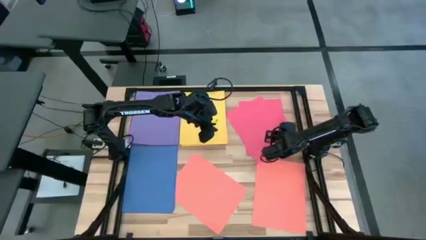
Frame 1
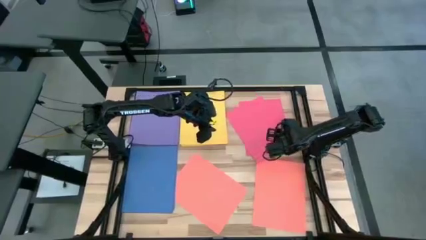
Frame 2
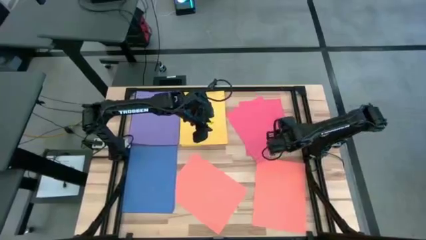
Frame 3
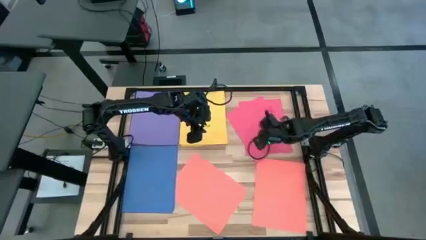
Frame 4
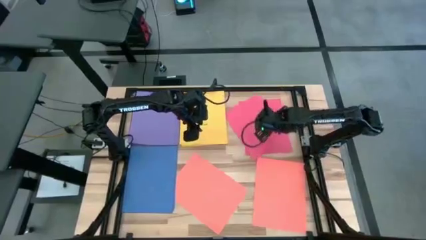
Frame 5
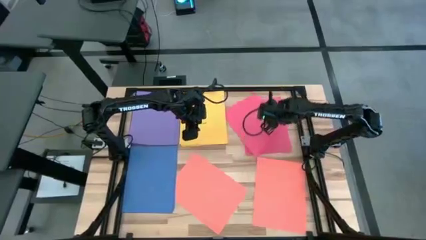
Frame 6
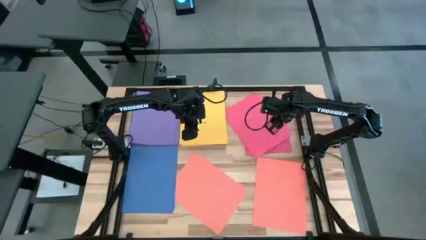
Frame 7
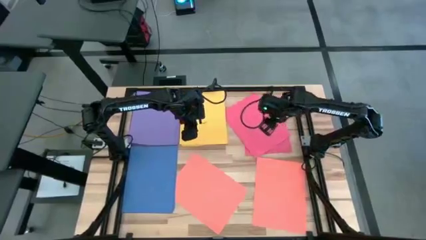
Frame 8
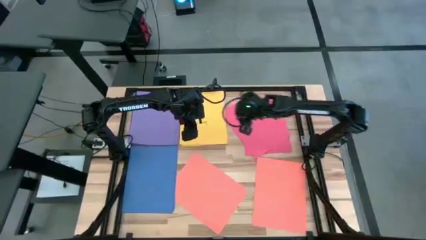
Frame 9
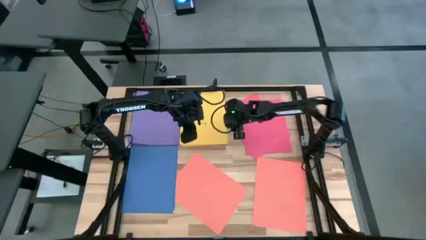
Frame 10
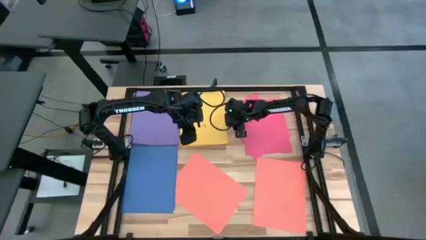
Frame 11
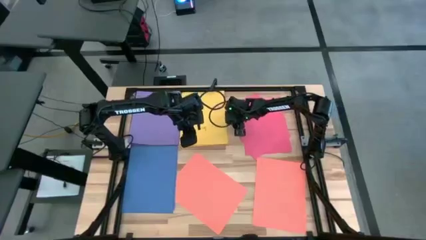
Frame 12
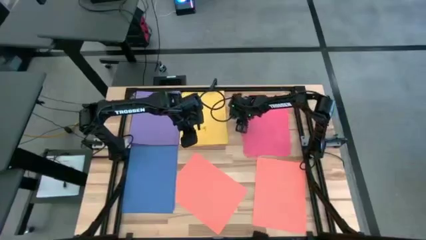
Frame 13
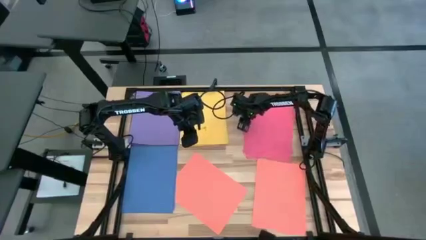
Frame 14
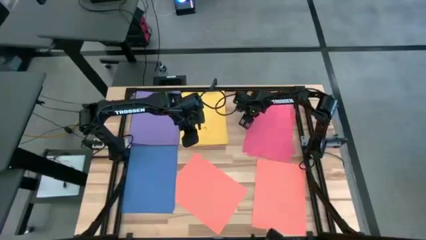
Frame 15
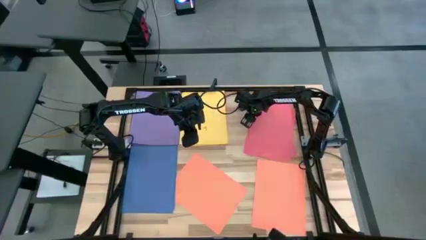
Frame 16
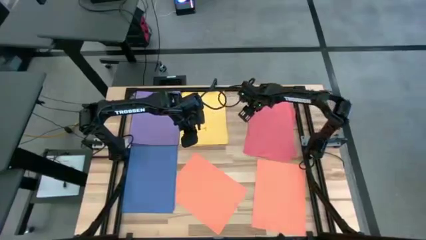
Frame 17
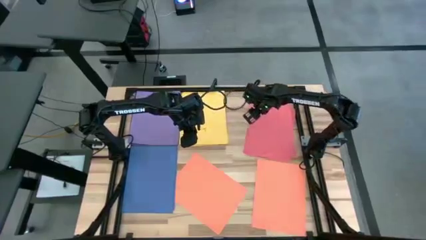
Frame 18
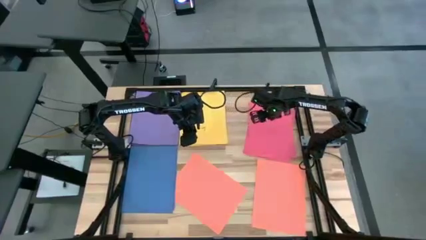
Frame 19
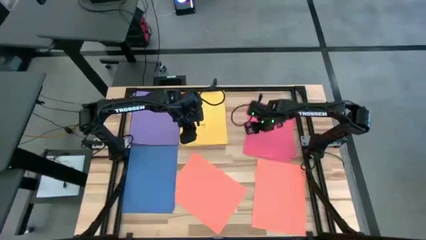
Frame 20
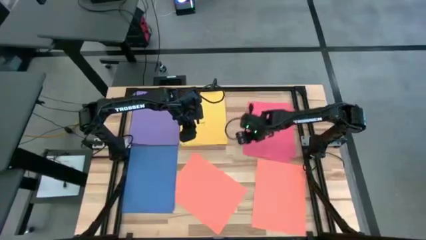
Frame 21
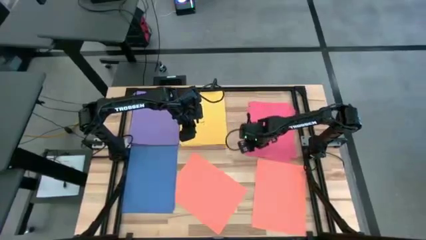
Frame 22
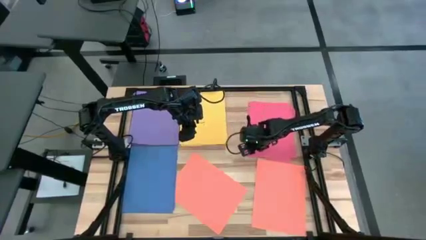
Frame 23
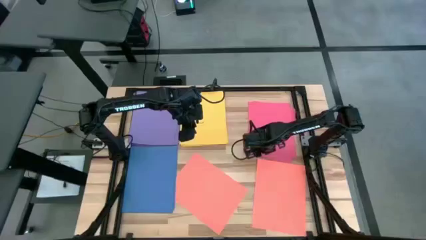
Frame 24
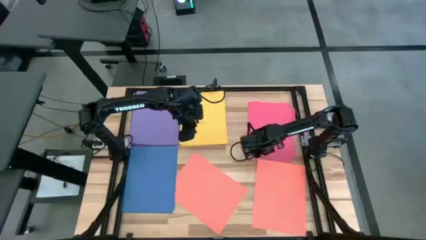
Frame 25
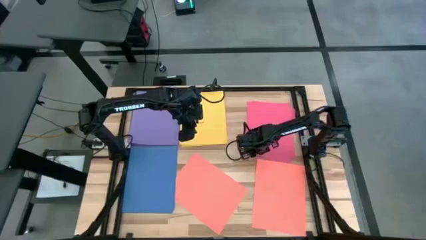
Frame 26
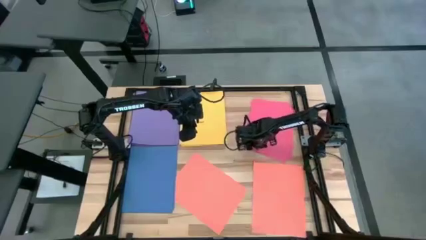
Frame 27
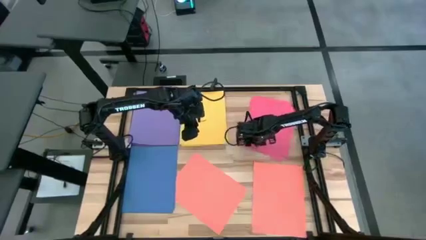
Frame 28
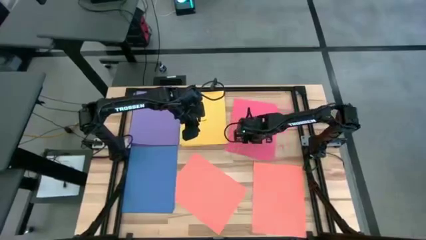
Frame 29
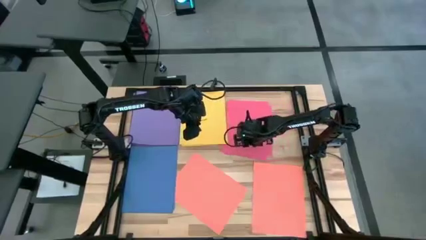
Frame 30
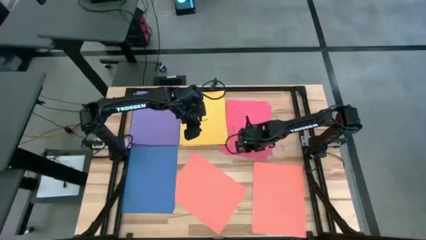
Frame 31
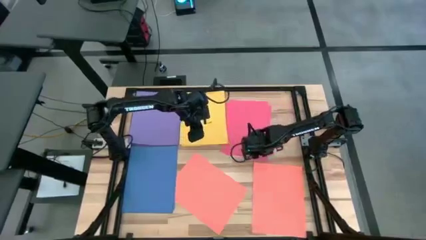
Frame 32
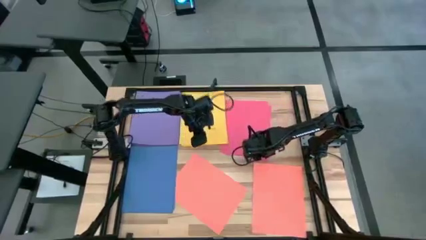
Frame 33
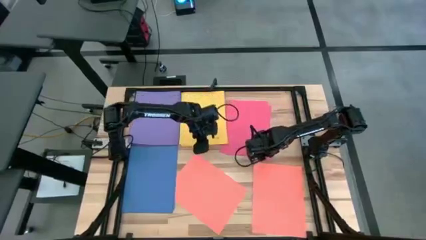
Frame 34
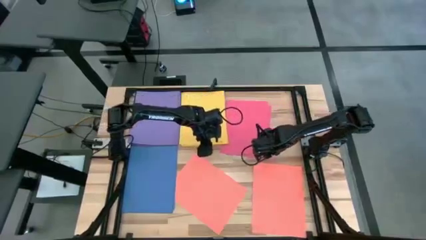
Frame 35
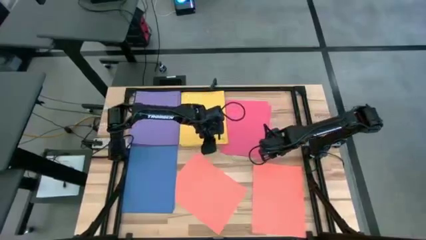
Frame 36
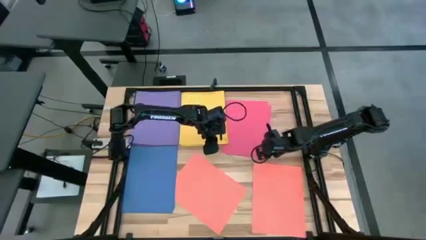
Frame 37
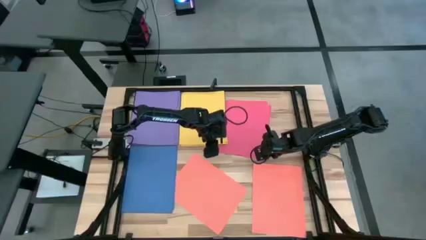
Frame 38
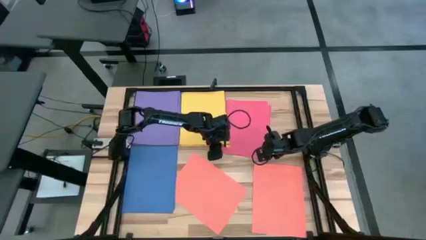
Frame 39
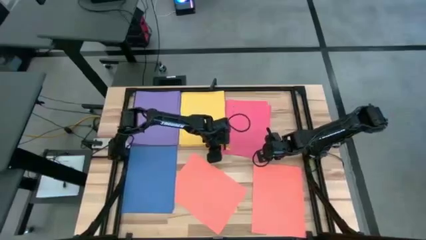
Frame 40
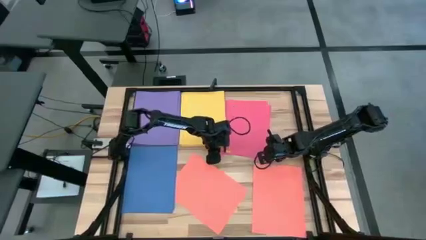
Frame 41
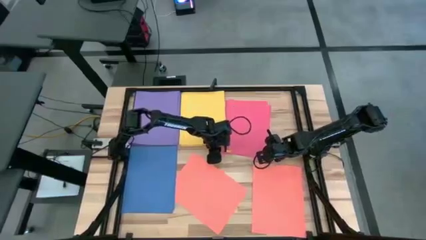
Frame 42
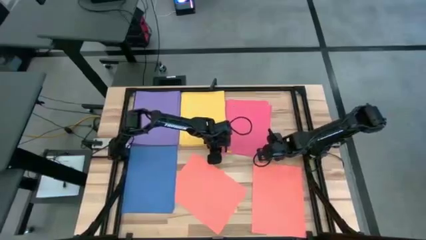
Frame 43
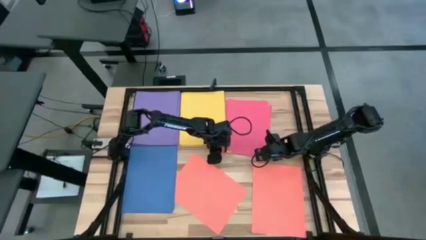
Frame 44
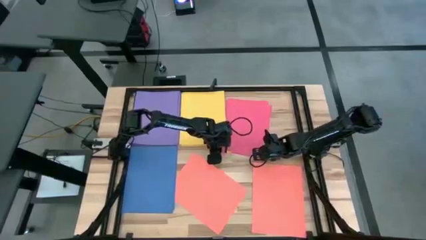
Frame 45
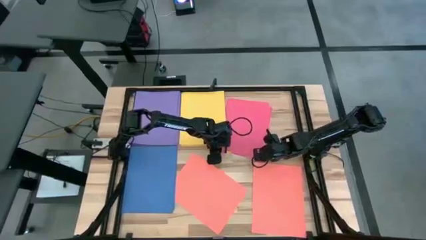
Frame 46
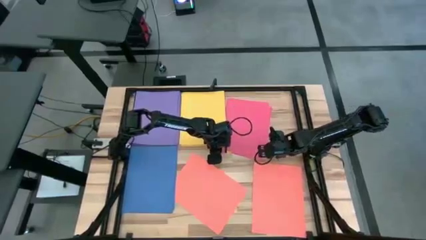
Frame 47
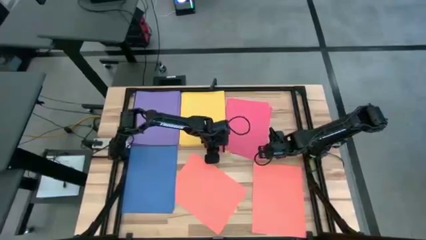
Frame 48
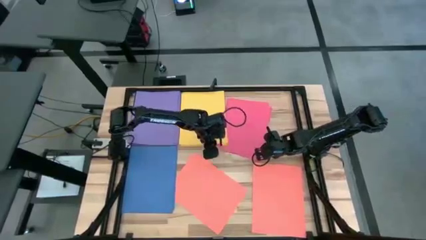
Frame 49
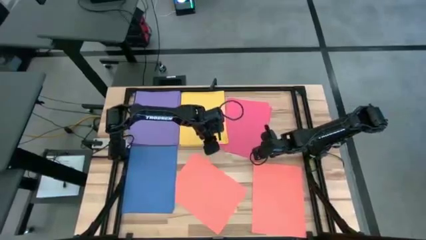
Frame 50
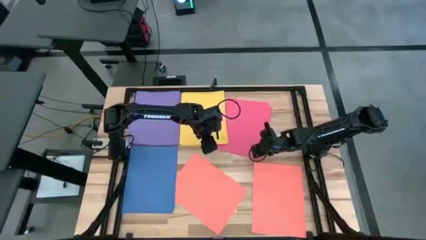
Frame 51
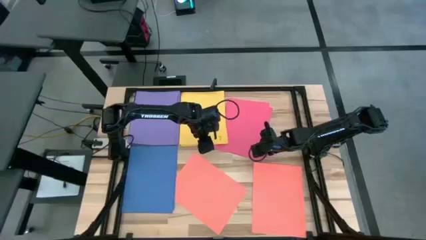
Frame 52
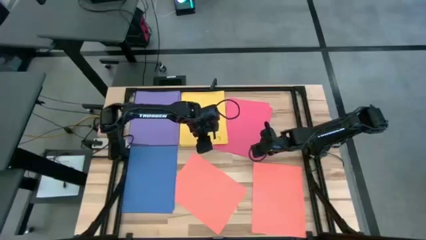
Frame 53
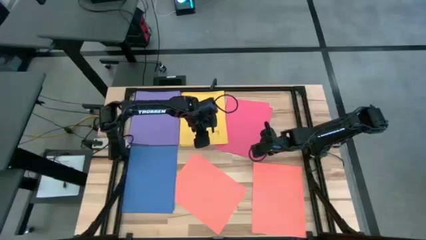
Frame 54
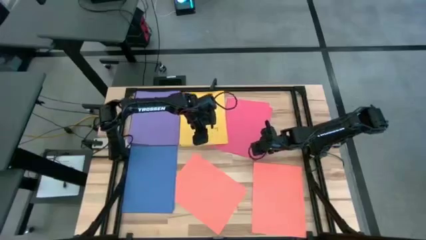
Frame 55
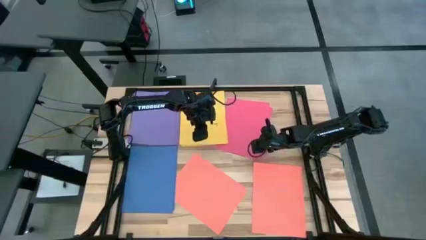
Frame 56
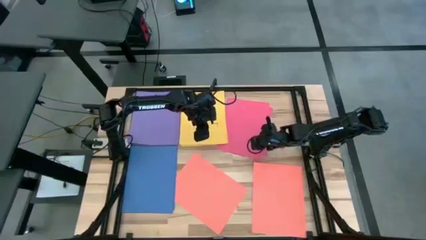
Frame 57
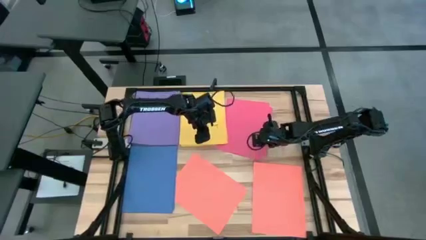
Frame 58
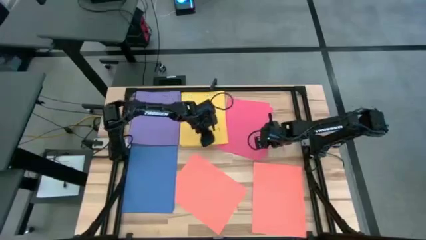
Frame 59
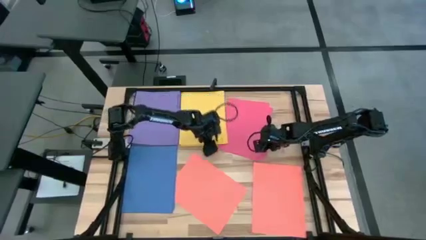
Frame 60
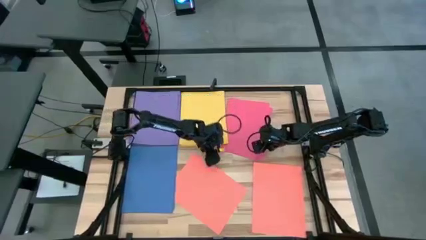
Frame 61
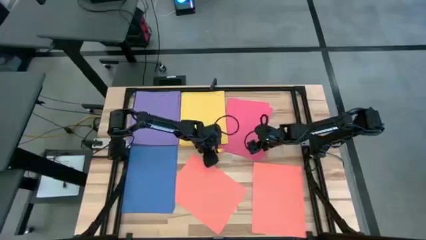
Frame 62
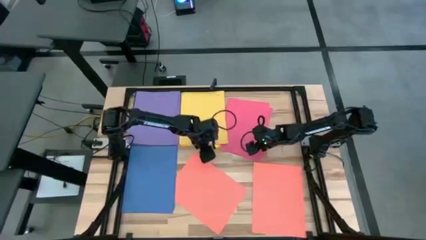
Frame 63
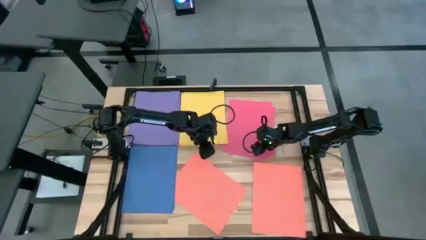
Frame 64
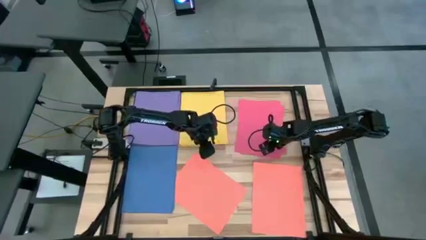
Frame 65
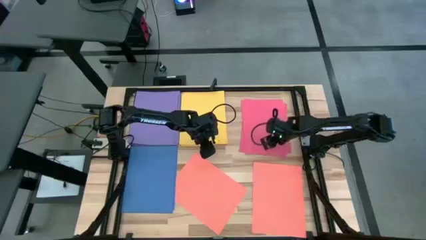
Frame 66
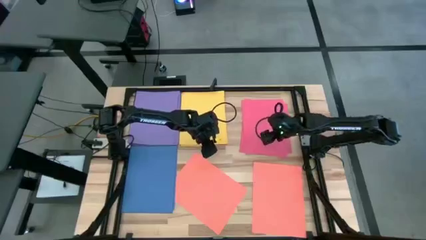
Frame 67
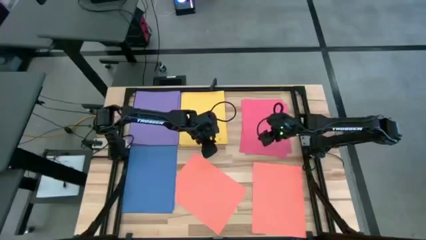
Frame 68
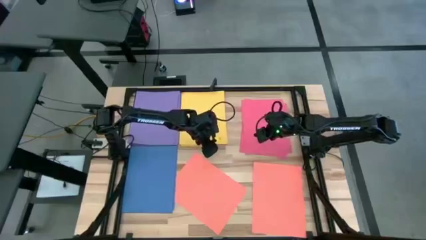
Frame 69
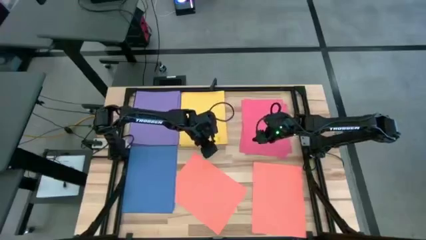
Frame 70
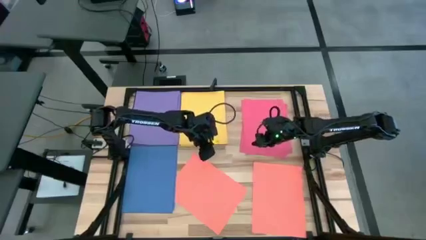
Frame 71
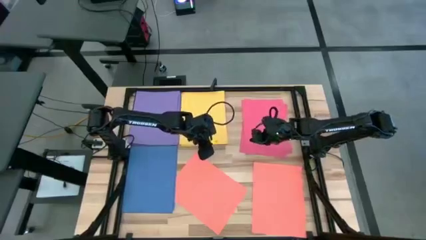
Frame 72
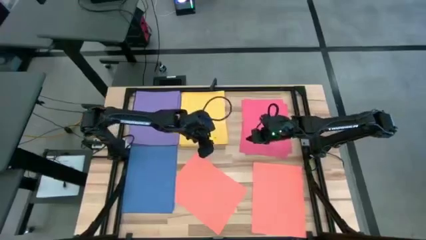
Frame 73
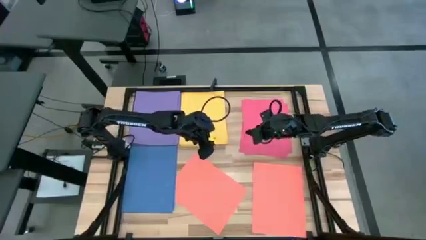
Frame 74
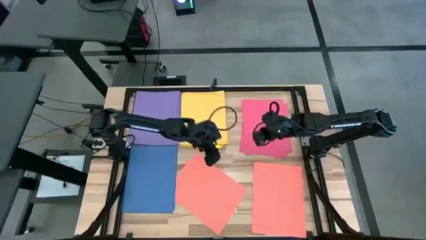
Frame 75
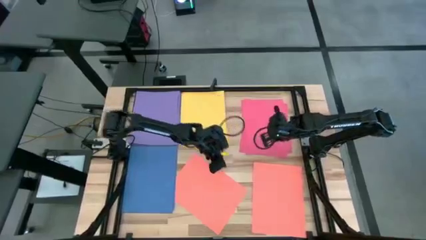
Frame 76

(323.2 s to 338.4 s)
Task: Organize paper
Stack the red paper on top of the red paper

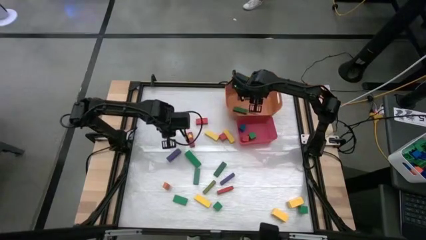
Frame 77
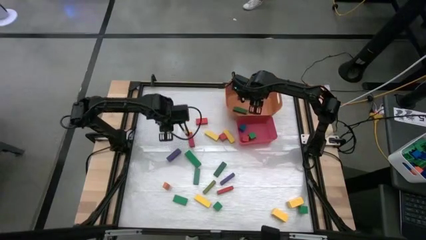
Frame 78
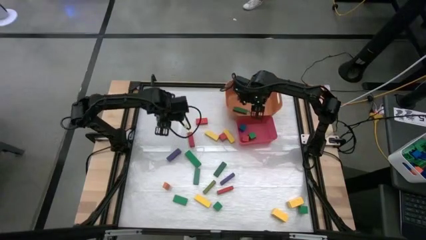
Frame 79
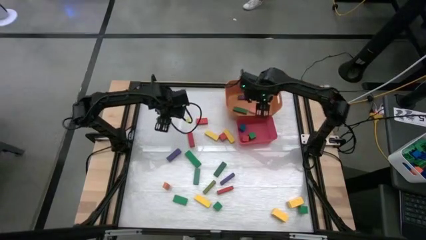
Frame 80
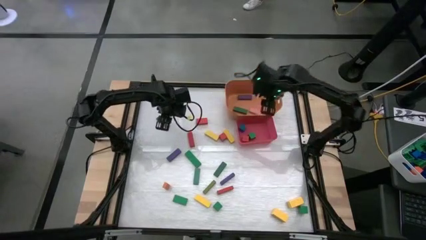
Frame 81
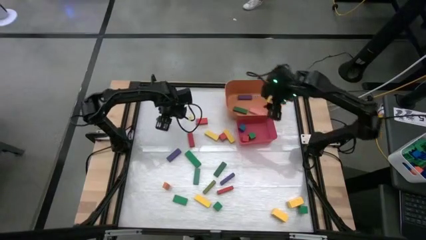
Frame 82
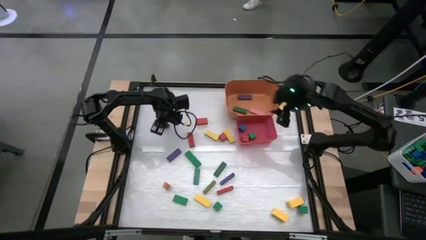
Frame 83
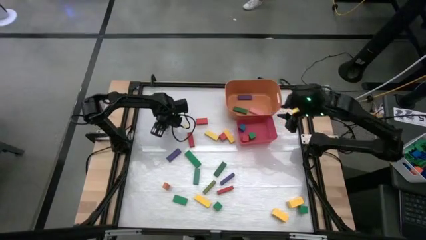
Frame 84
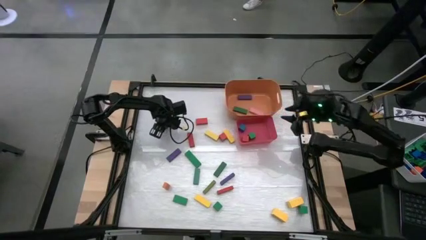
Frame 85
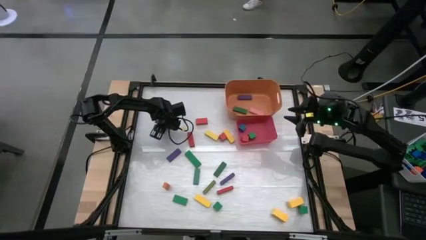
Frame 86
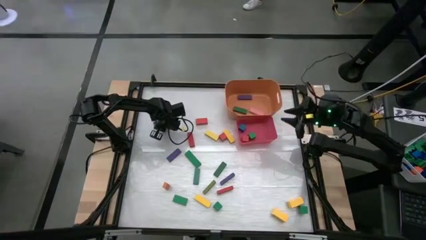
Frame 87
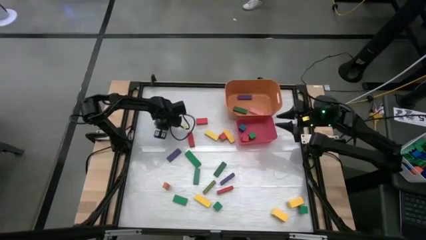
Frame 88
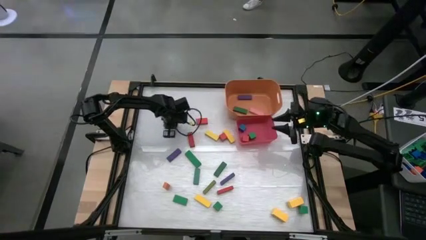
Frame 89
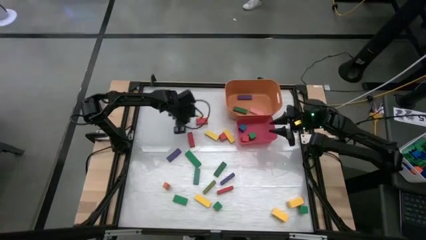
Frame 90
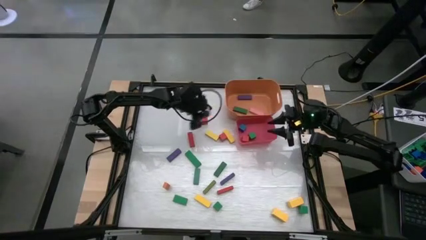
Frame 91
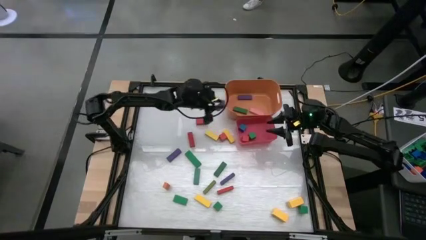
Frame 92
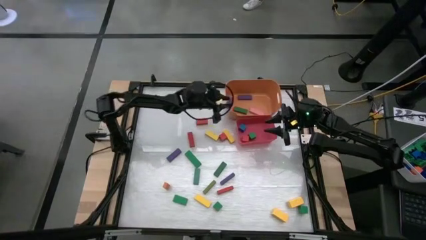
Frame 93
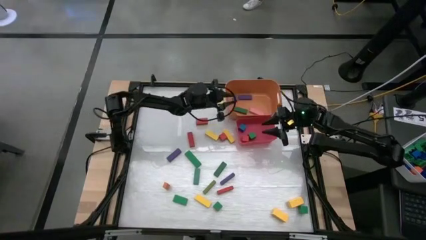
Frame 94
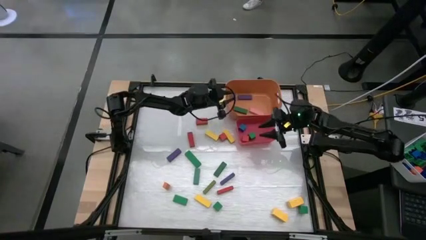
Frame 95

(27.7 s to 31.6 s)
Task: Sort blocks by size
Put the violet rectangle block into the orange bin
